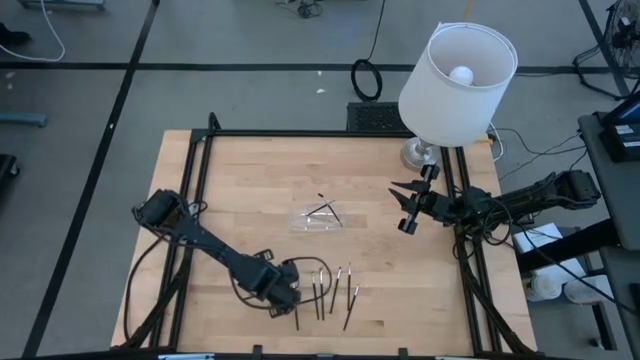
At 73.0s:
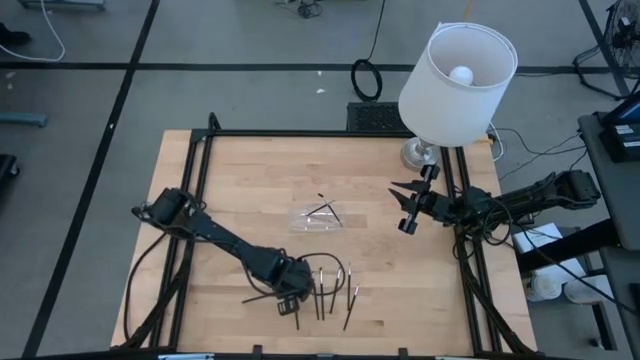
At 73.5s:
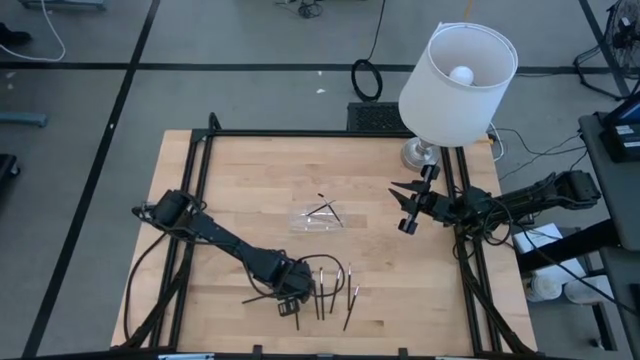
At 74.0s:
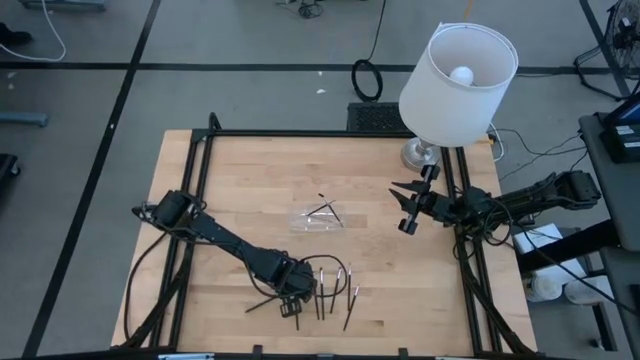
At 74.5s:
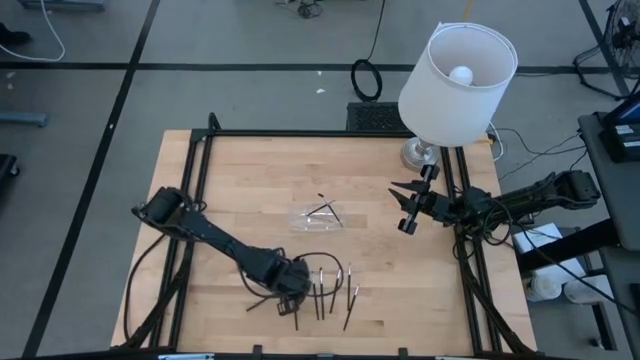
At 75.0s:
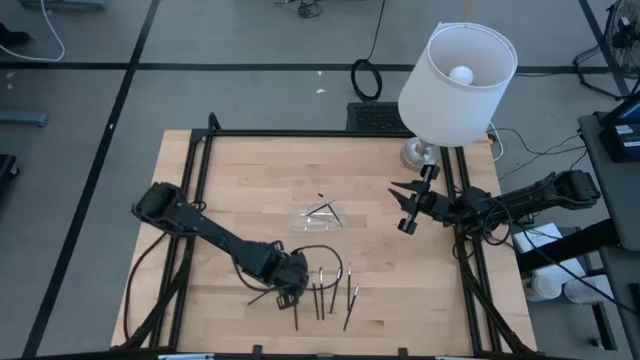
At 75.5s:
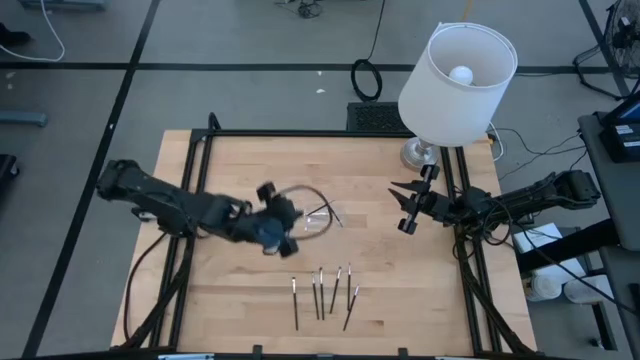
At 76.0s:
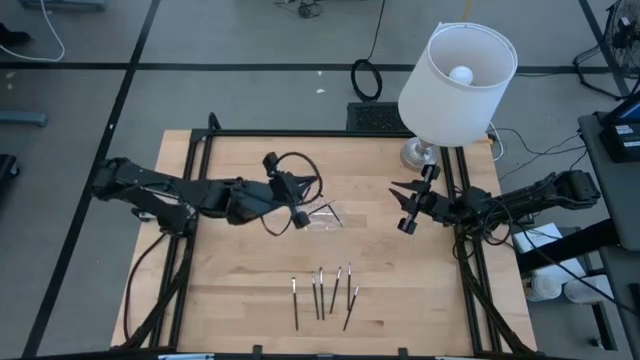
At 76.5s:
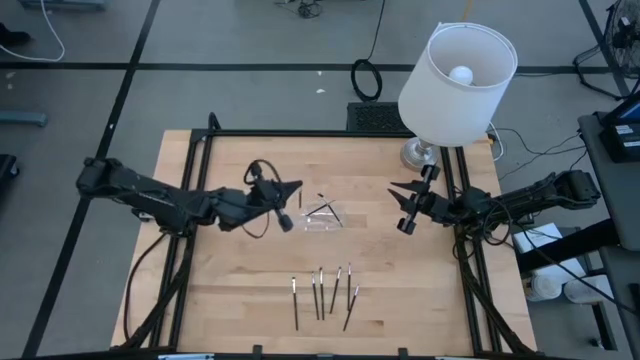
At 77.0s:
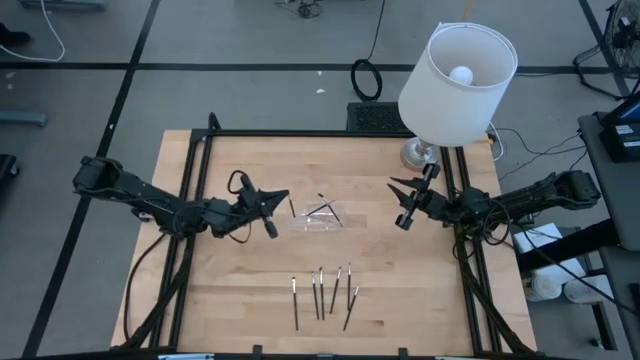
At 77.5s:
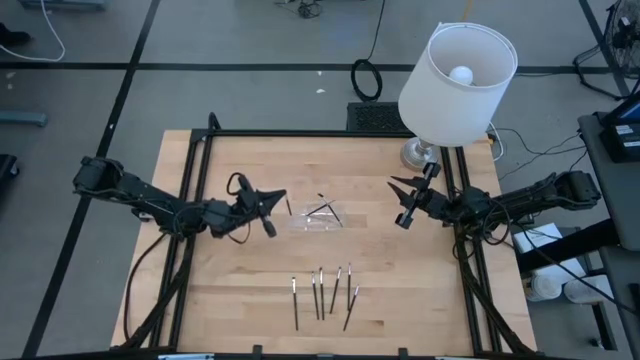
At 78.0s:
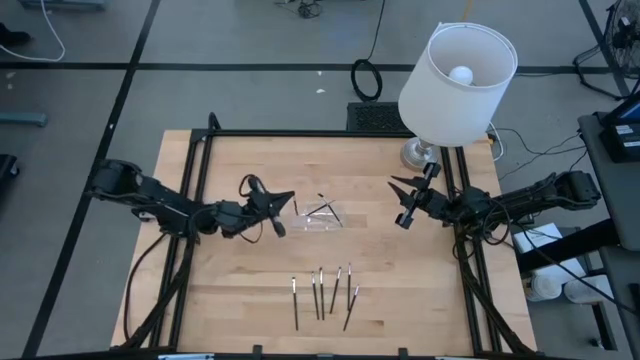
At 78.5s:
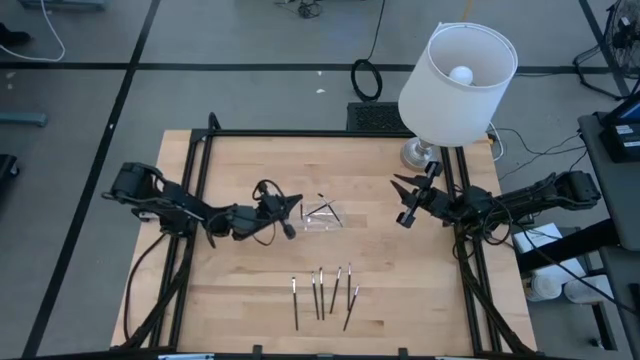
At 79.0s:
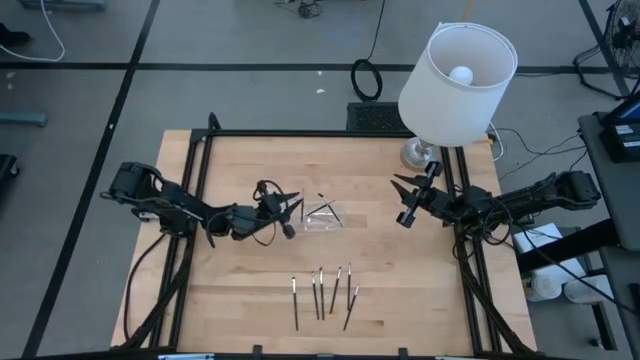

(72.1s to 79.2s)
Task: Pick & Place Makeup Supplies
Put the makeup brush into the transparent organizer

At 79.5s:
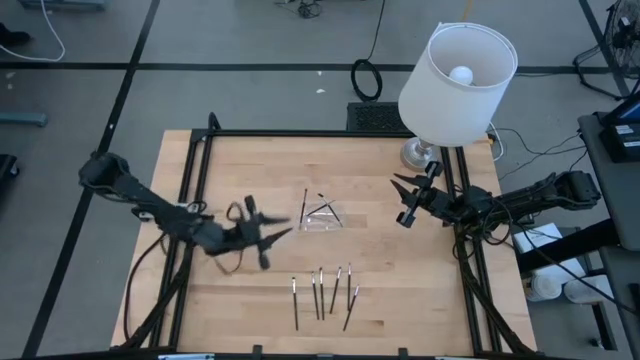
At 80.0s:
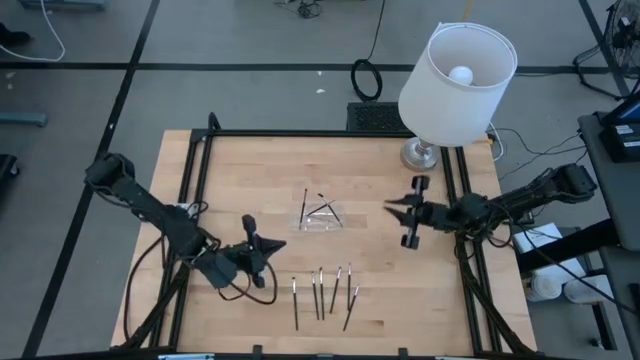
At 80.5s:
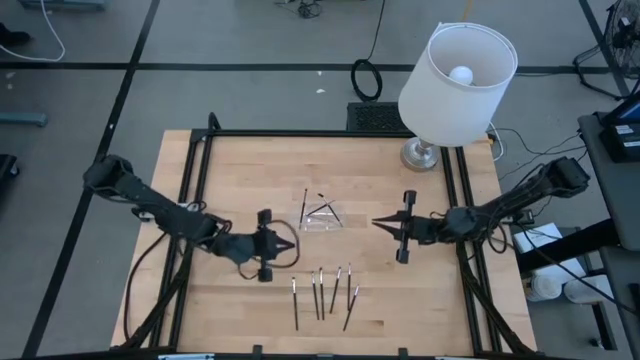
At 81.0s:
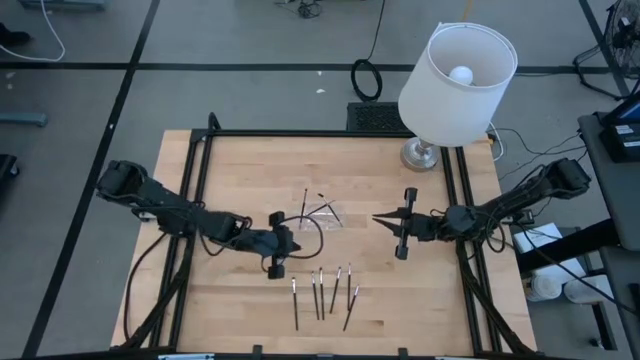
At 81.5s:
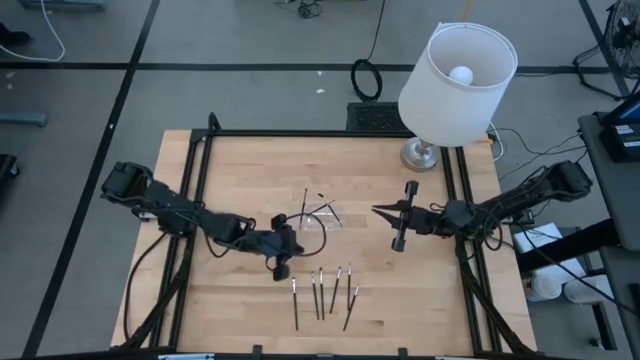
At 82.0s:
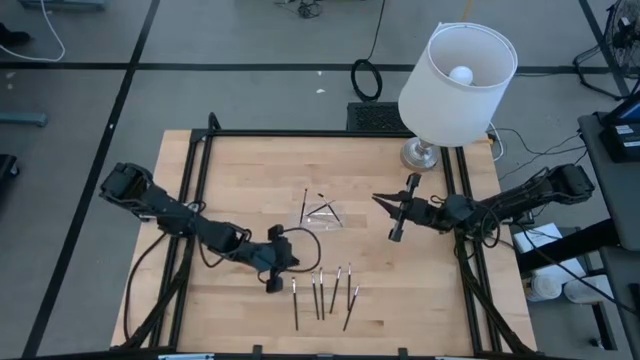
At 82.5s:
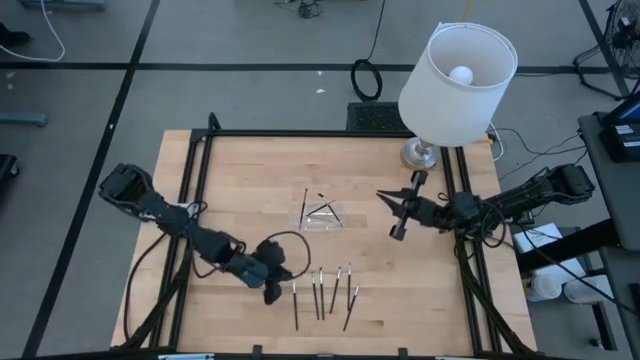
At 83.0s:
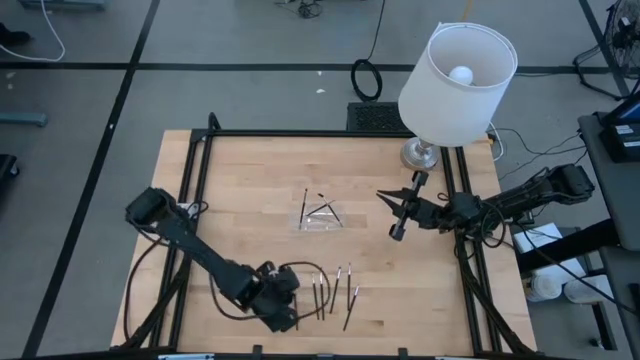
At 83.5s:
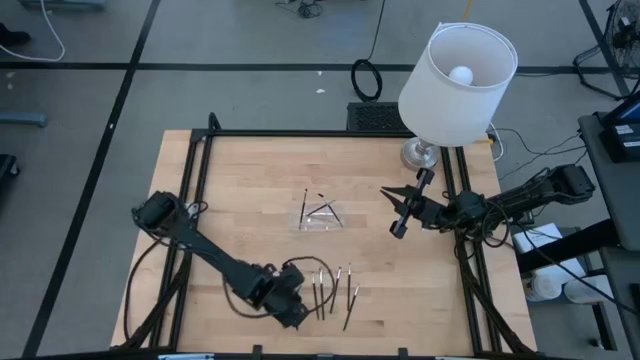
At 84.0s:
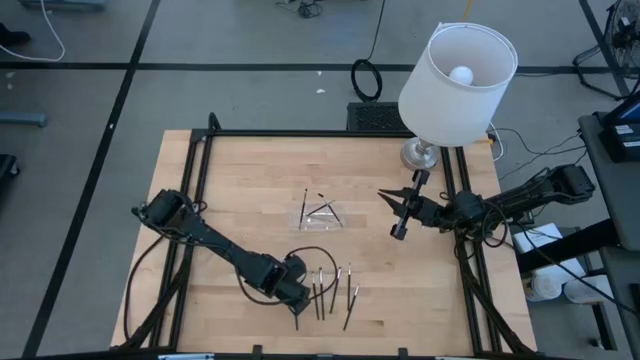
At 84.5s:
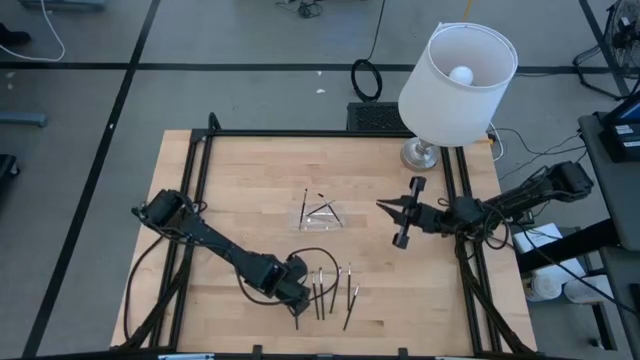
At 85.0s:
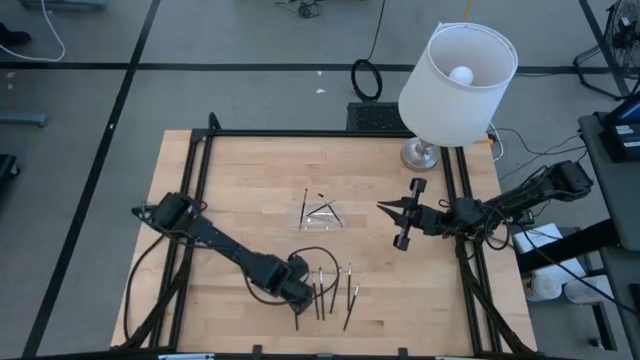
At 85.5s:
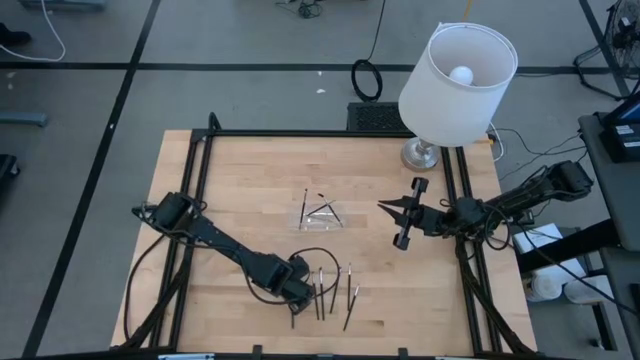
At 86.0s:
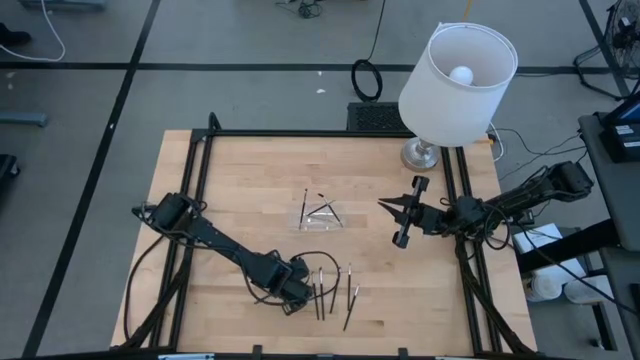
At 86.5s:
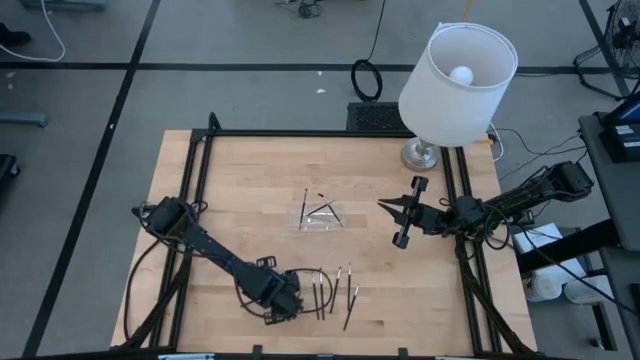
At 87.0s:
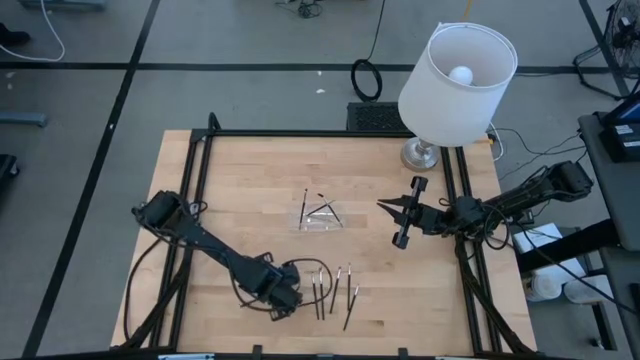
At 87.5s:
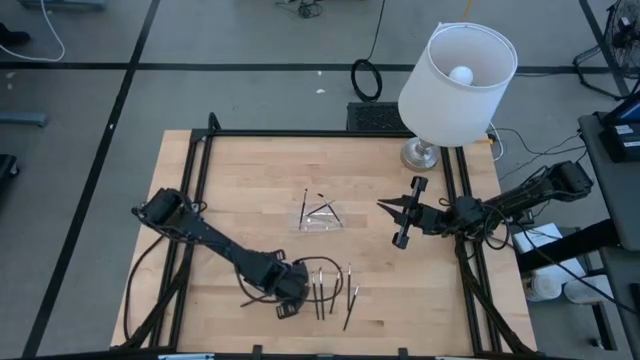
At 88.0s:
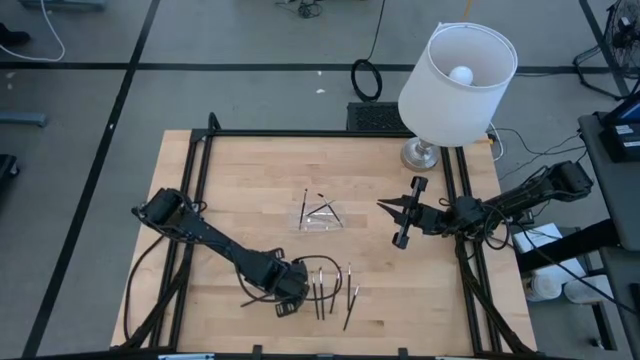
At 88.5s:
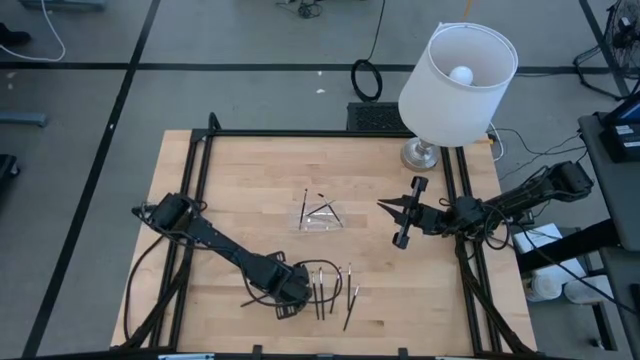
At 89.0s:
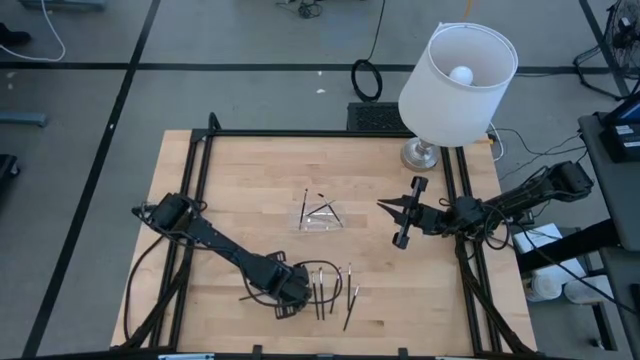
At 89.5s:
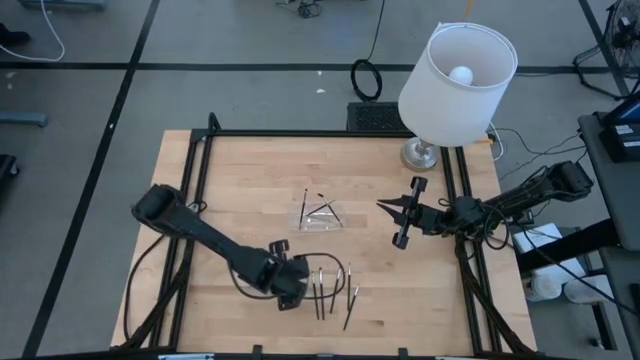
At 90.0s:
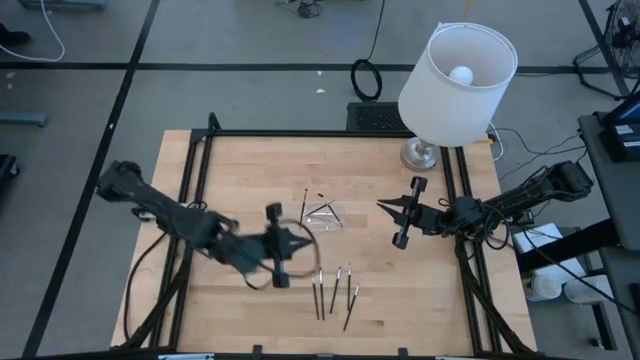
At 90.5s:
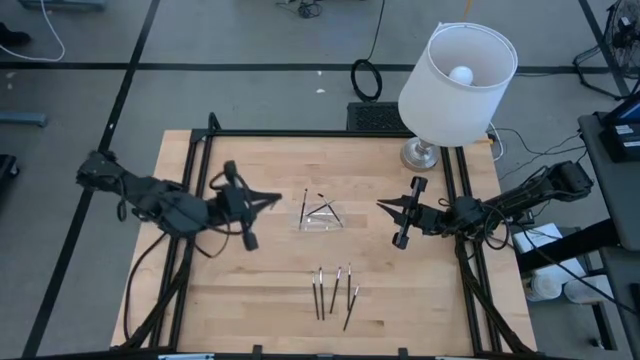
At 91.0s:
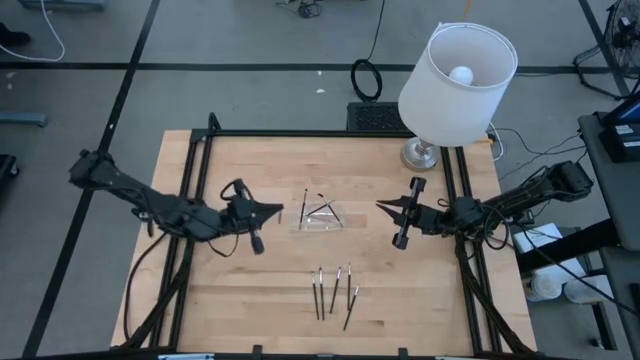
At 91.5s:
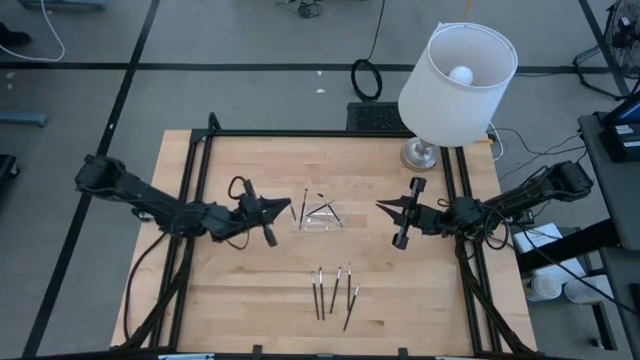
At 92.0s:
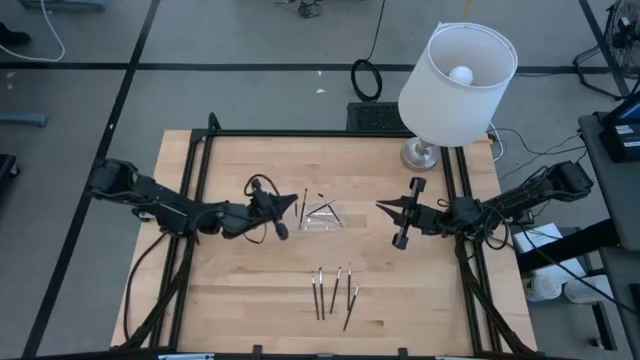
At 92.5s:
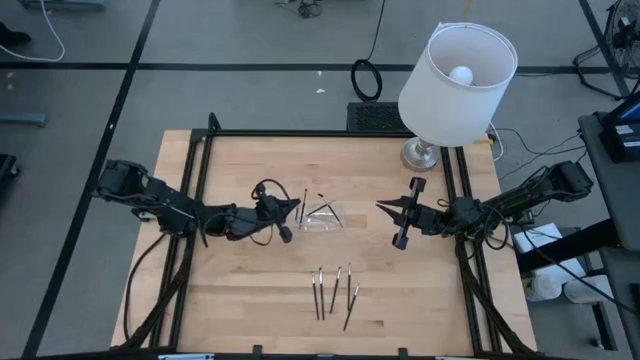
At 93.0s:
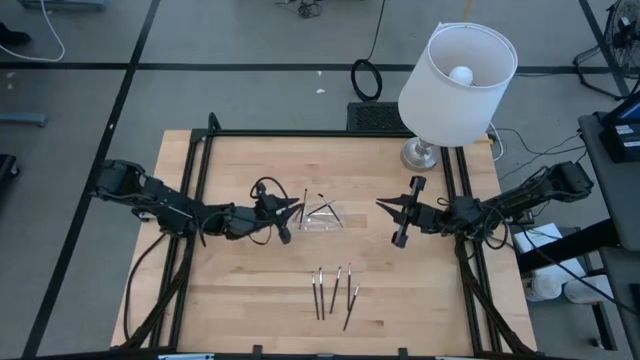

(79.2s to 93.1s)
Put the makeup brush into the transparent organizer
